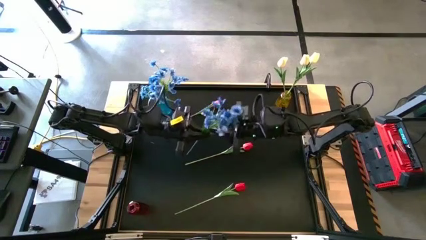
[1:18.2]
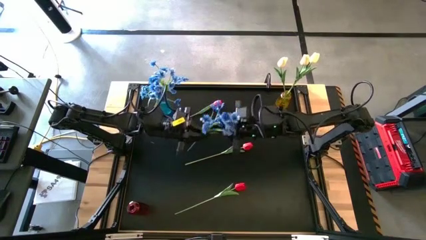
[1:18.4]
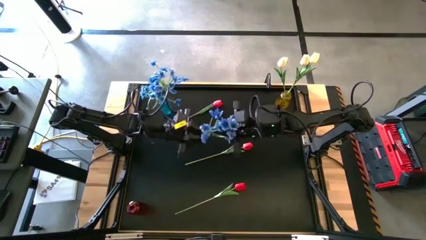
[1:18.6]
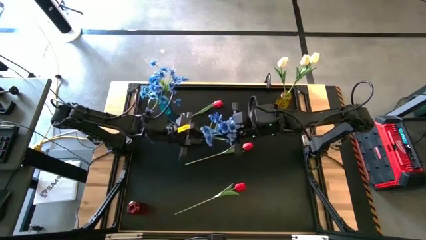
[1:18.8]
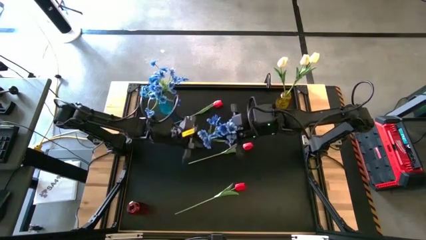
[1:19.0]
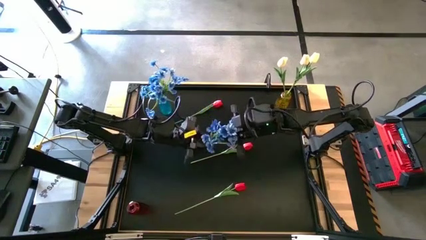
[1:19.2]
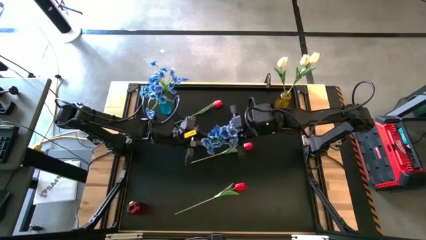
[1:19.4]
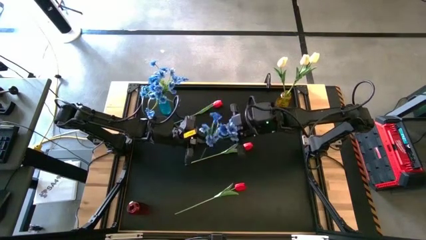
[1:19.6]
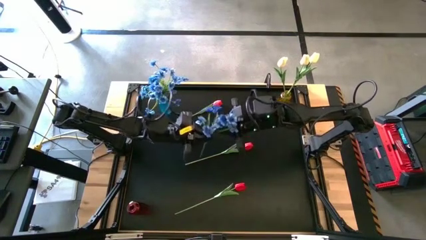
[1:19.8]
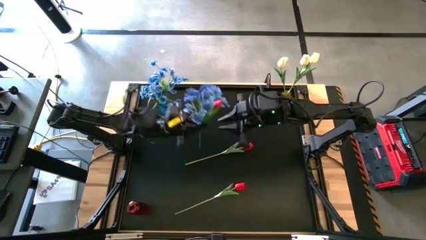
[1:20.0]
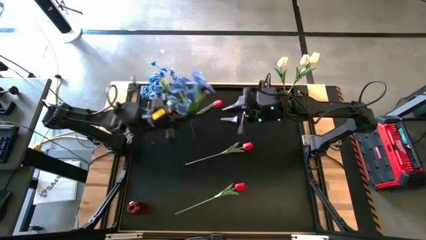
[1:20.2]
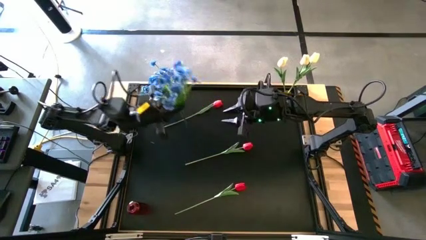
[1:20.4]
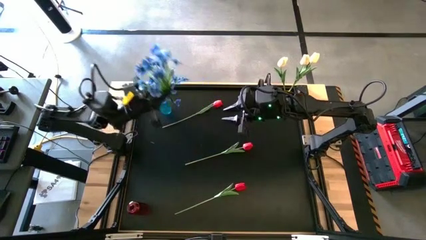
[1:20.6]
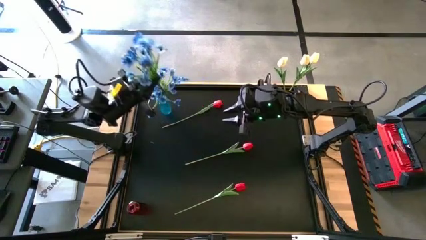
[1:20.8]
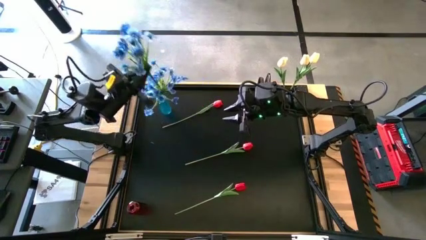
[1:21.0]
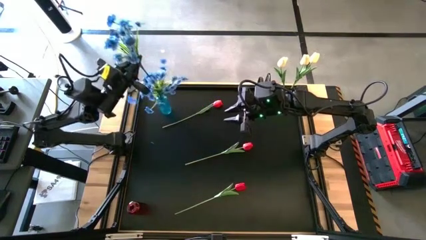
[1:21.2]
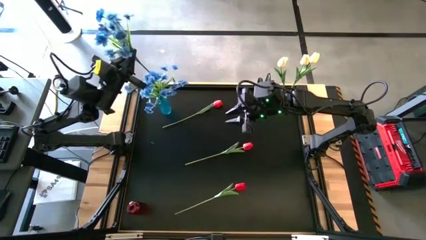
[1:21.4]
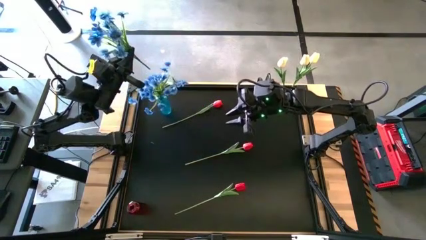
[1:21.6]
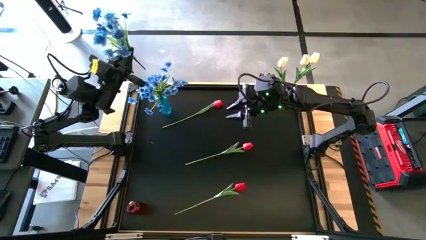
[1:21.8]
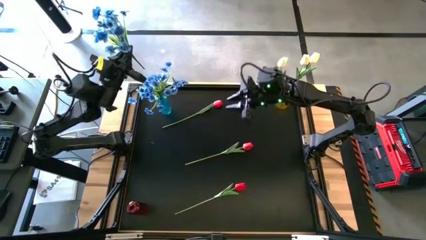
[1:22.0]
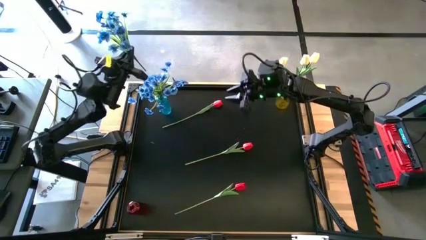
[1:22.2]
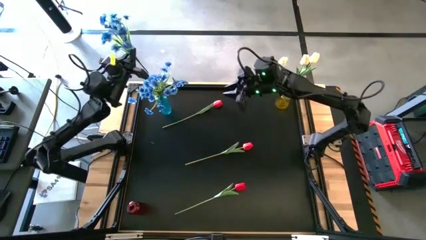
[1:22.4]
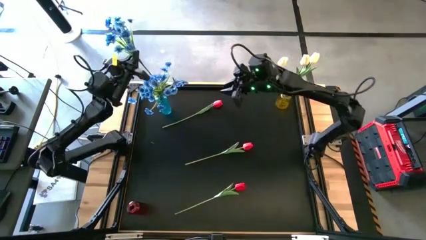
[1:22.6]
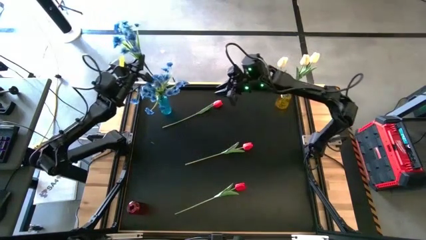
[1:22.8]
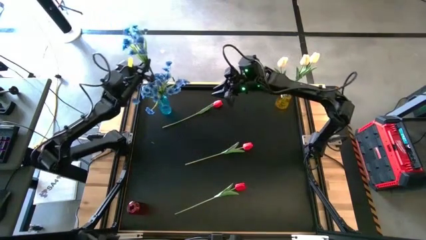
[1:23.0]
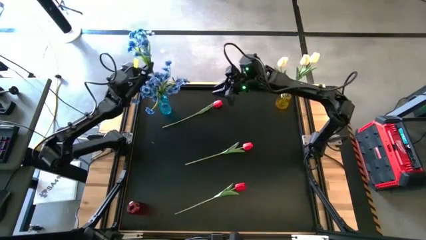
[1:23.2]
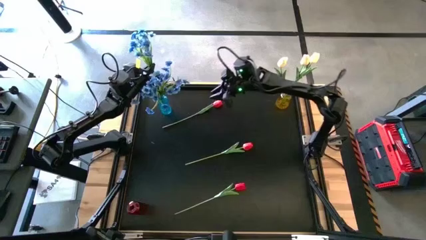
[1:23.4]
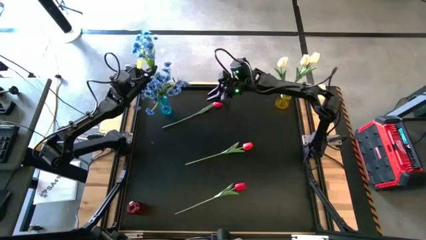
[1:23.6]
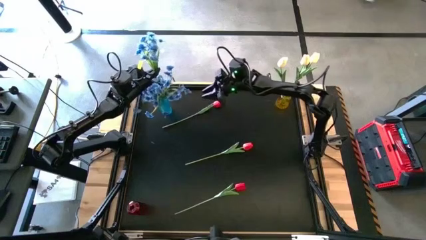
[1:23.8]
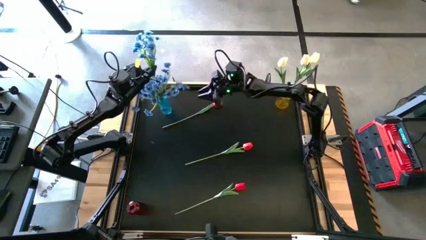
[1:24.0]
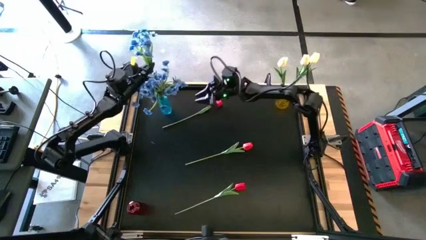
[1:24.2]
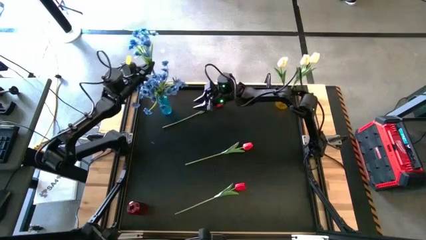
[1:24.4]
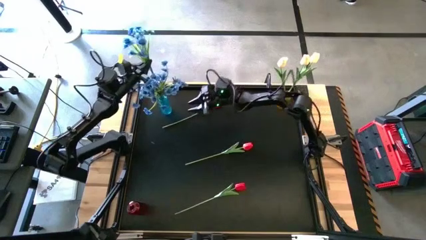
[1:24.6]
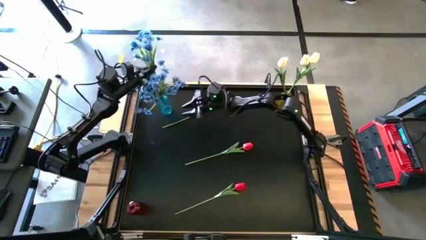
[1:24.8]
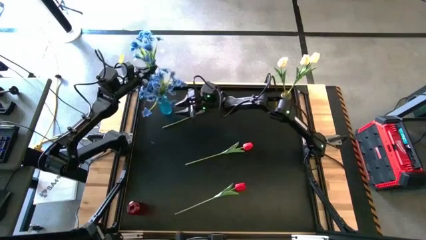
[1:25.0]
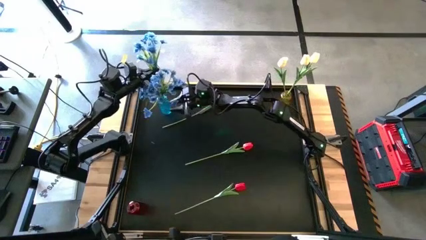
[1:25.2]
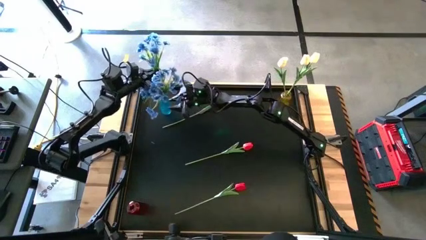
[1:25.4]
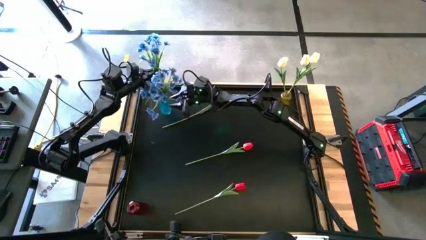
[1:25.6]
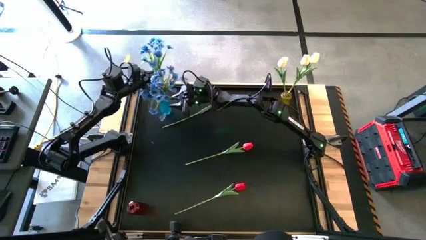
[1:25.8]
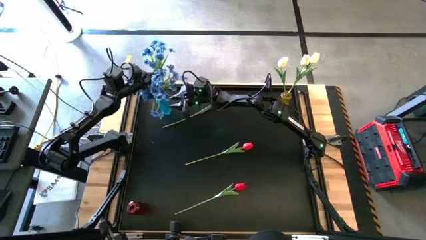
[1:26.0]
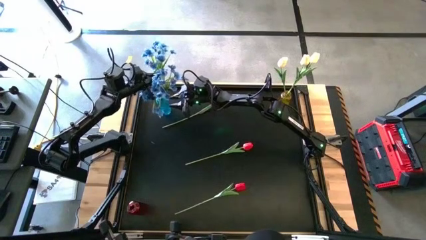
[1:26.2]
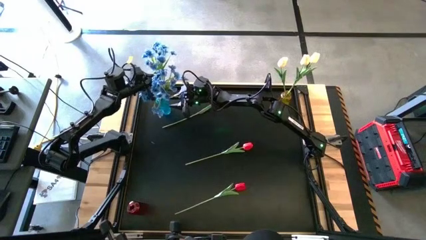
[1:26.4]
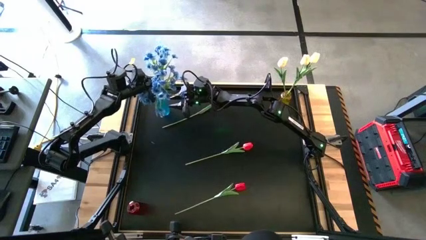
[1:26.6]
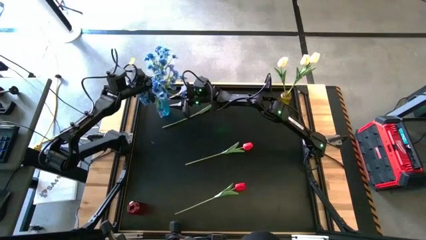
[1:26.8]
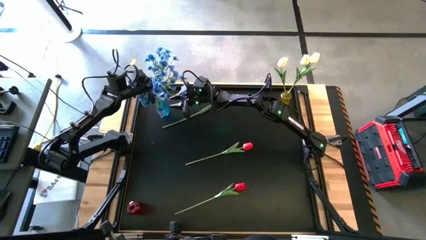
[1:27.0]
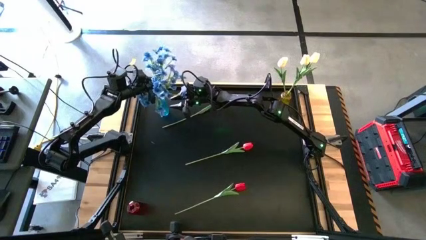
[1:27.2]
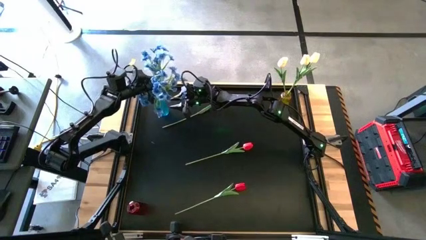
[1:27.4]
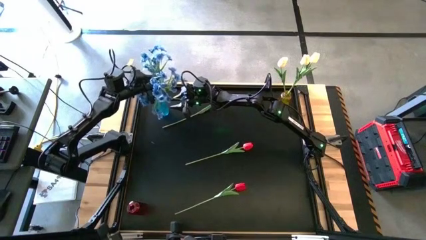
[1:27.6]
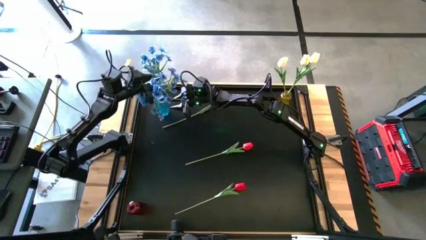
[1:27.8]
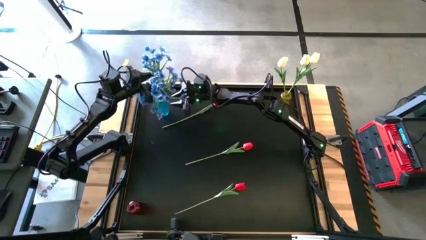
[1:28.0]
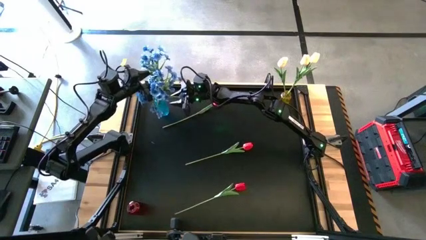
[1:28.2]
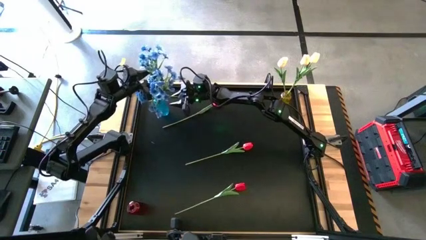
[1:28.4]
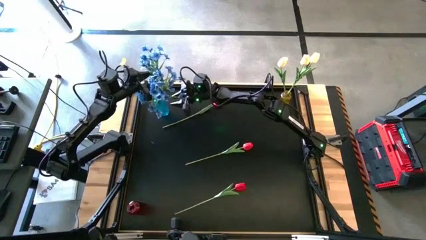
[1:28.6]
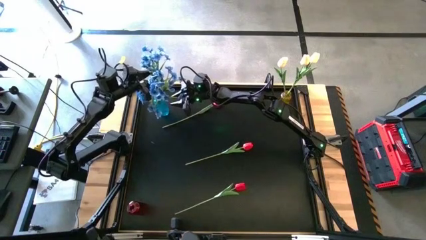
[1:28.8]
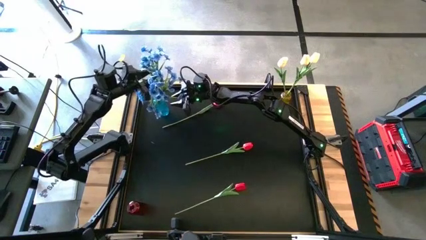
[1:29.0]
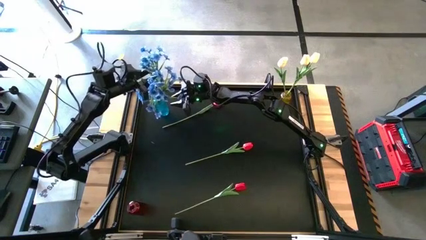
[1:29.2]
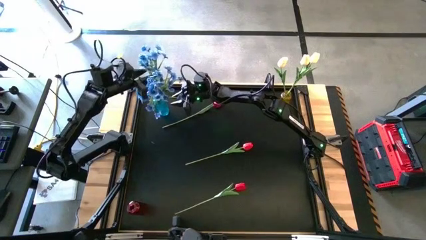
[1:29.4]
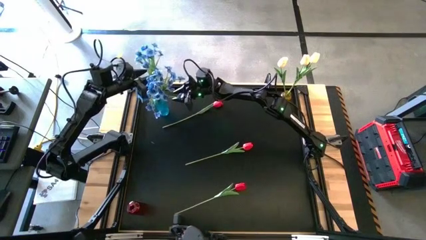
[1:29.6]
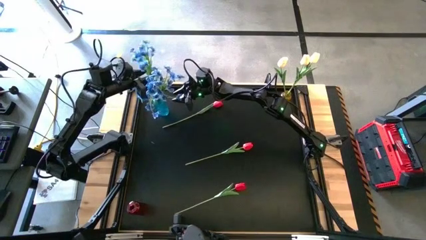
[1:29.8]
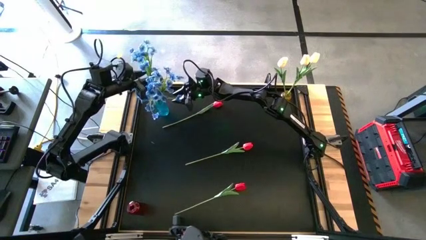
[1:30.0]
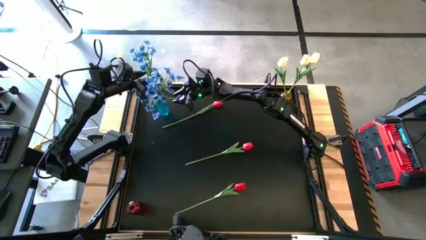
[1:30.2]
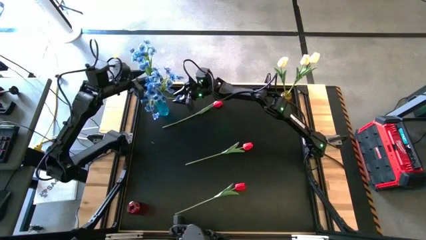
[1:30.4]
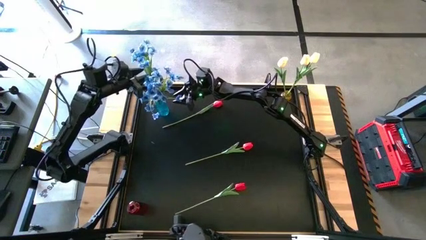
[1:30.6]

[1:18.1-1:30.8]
Task: Sort flowers into vase by color
Put the blue flowers into the blue vase

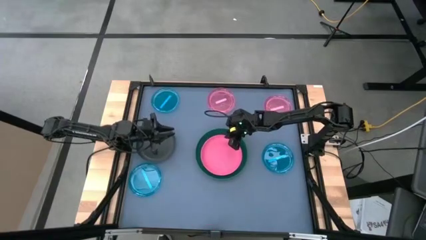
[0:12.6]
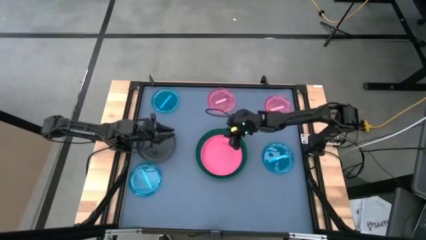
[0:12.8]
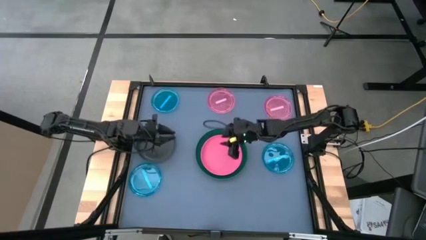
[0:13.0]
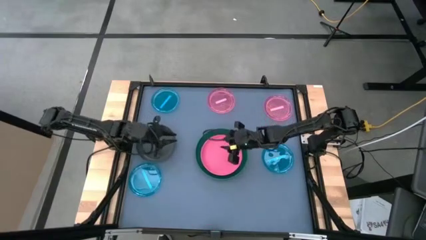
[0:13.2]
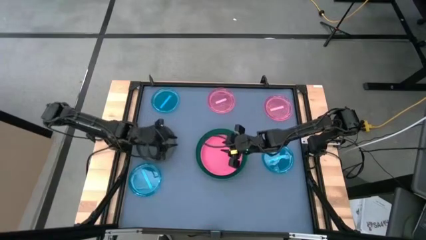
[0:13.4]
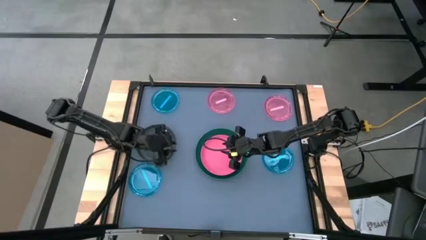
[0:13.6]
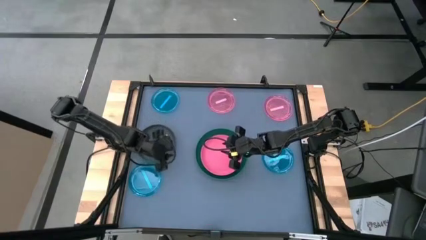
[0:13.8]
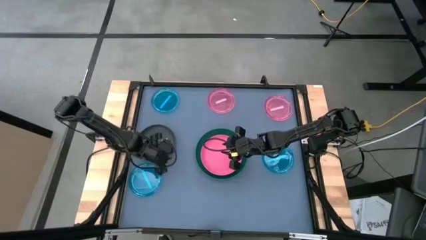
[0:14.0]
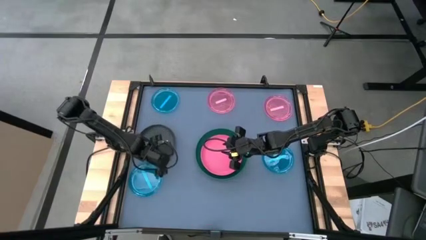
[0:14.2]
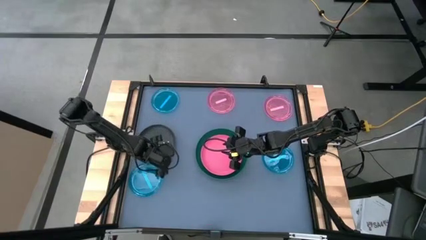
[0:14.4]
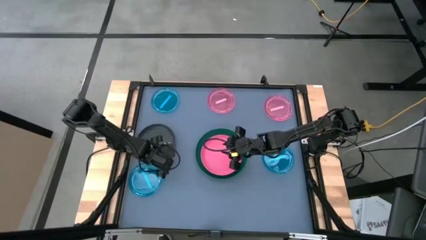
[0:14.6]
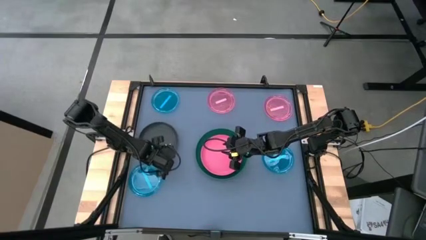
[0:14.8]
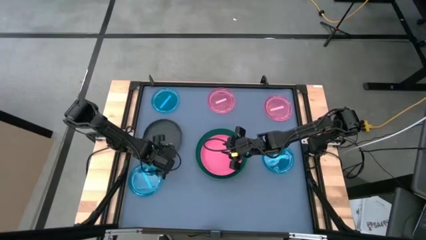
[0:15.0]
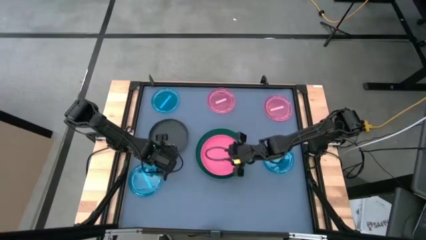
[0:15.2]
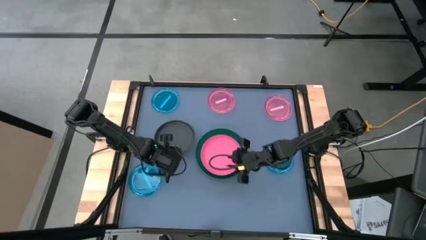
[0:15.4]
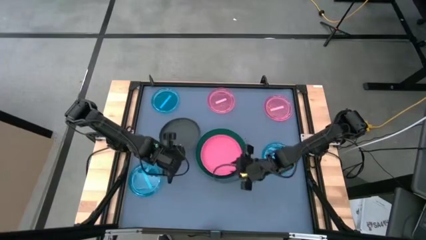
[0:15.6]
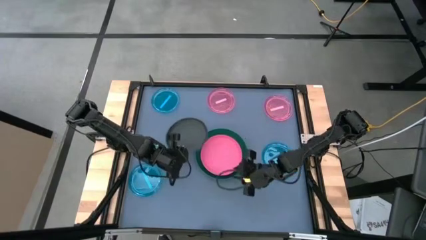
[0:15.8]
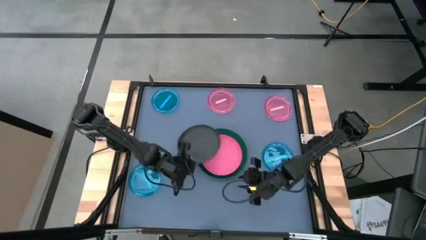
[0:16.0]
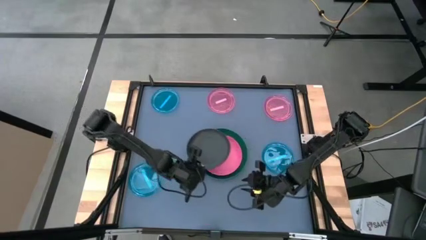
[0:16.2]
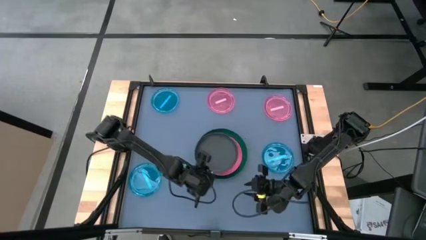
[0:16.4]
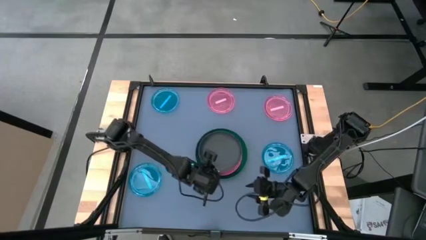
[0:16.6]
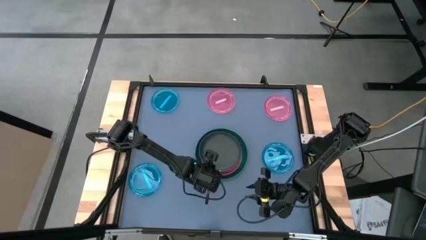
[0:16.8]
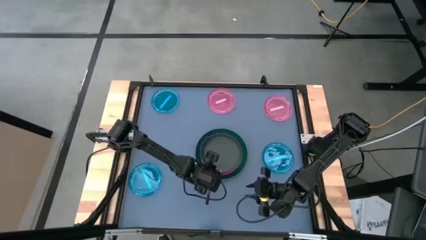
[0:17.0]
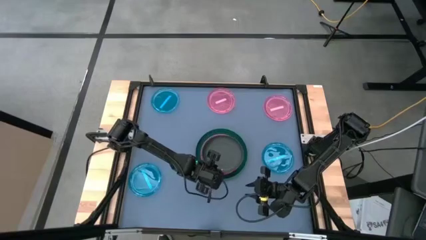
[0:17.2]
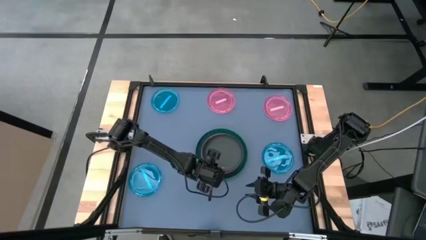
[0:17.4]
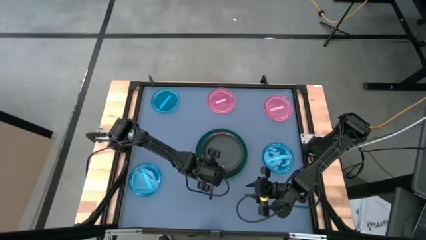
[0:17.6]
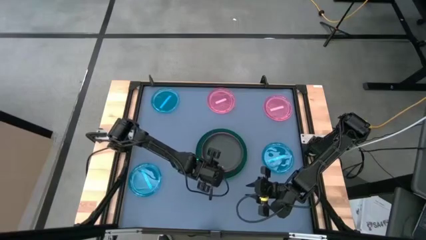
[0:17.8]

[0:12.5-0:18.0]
Task: Stack plastic plates
Stack the black plate on top of the pink plate
